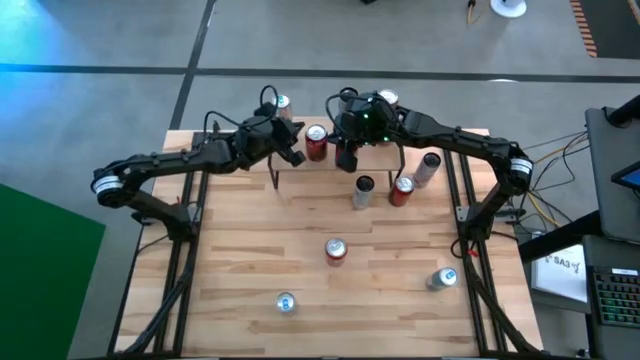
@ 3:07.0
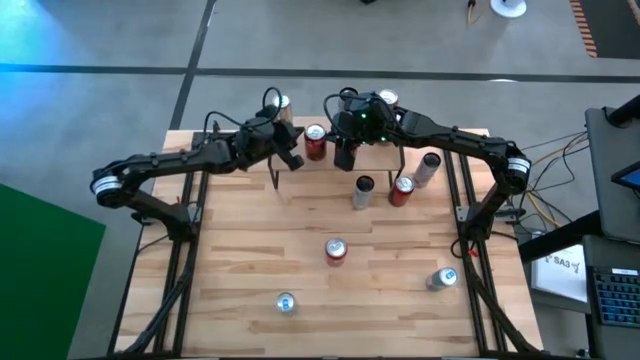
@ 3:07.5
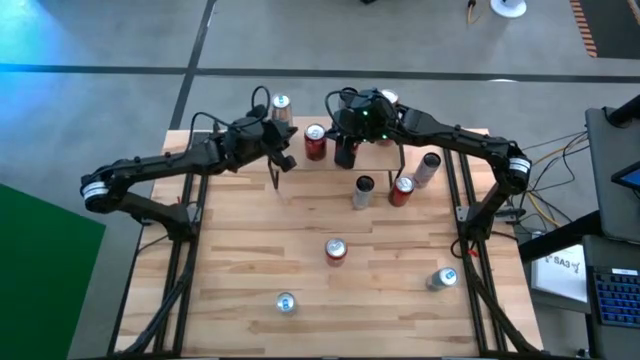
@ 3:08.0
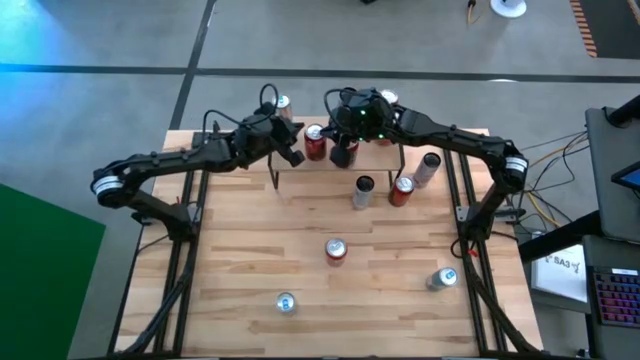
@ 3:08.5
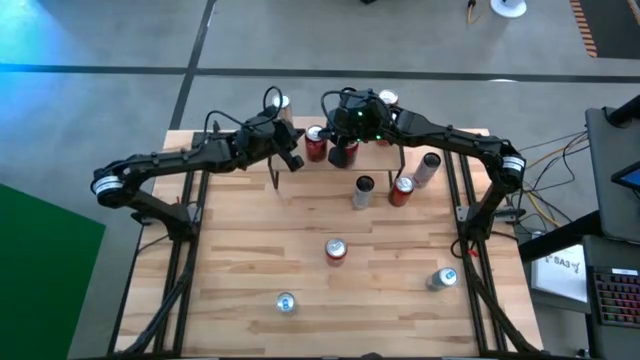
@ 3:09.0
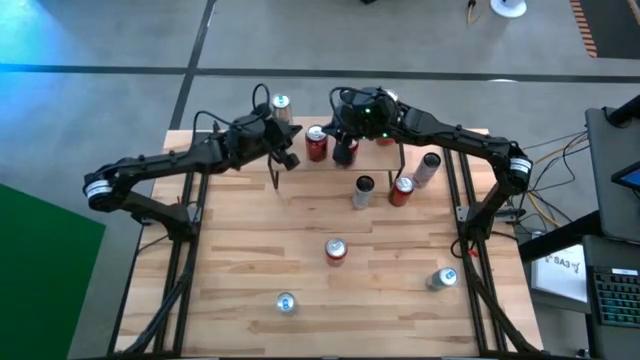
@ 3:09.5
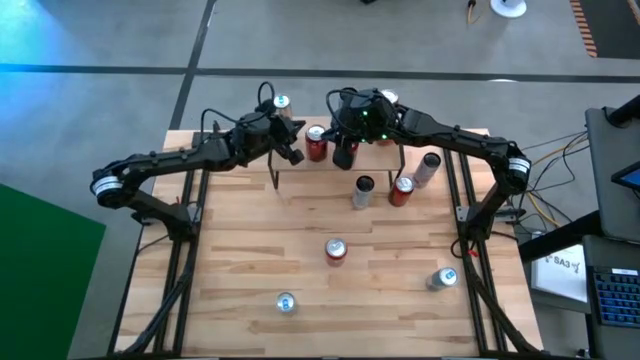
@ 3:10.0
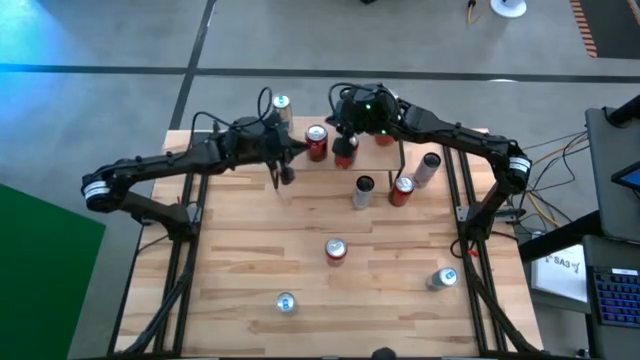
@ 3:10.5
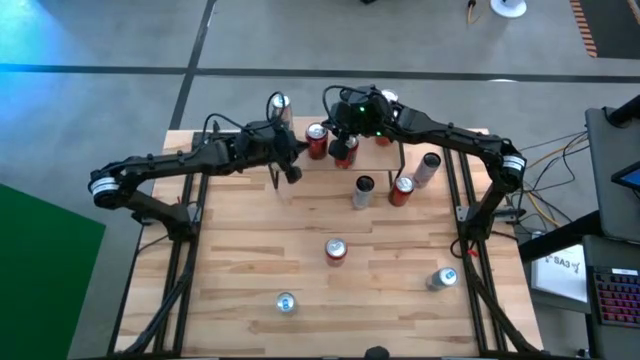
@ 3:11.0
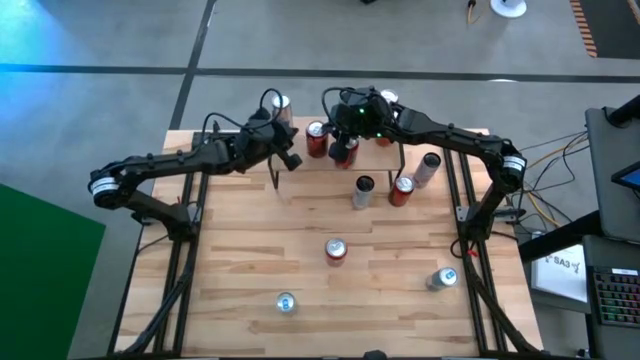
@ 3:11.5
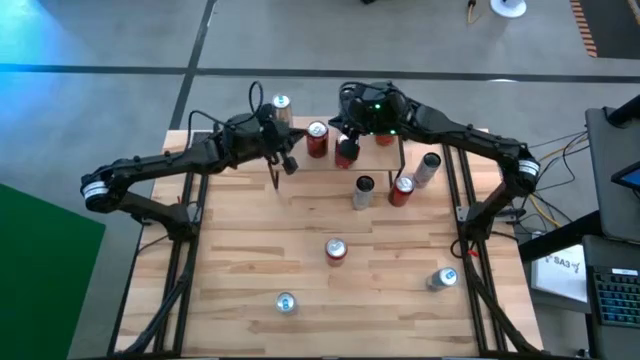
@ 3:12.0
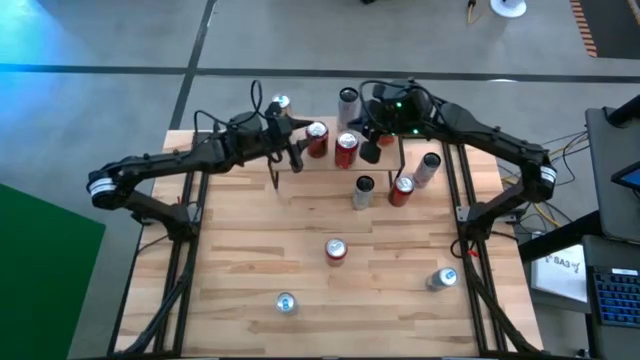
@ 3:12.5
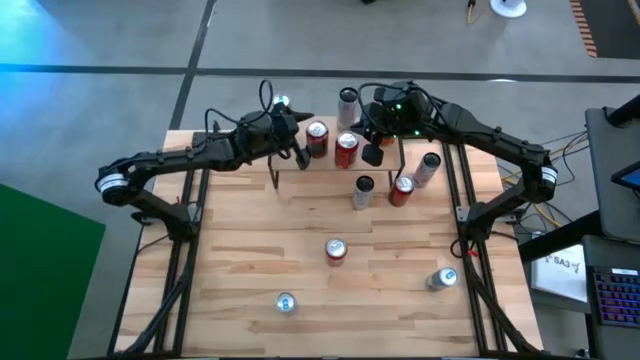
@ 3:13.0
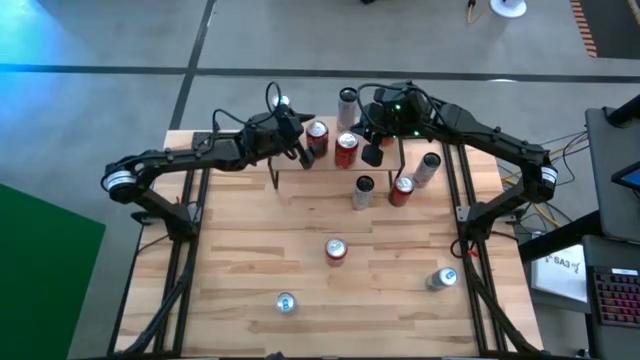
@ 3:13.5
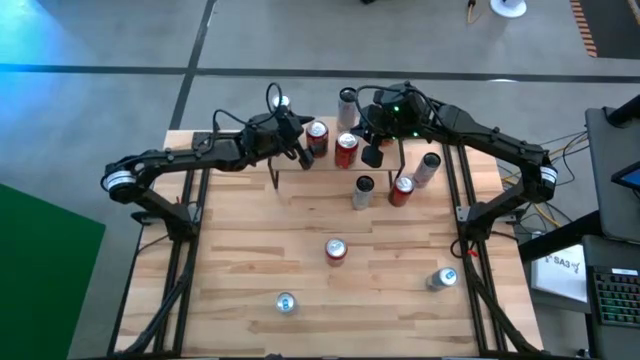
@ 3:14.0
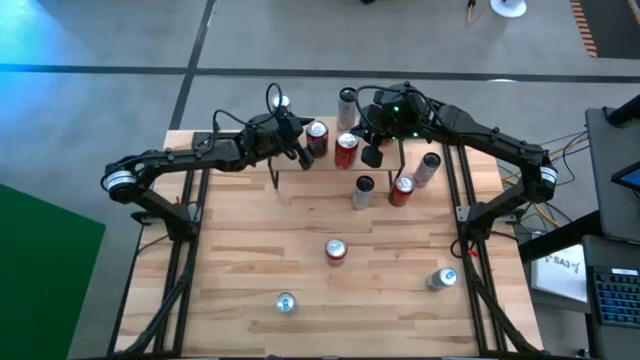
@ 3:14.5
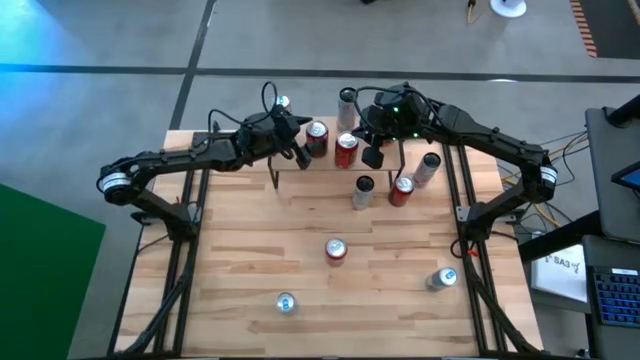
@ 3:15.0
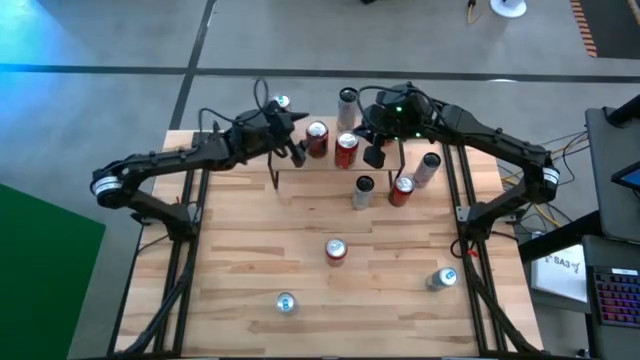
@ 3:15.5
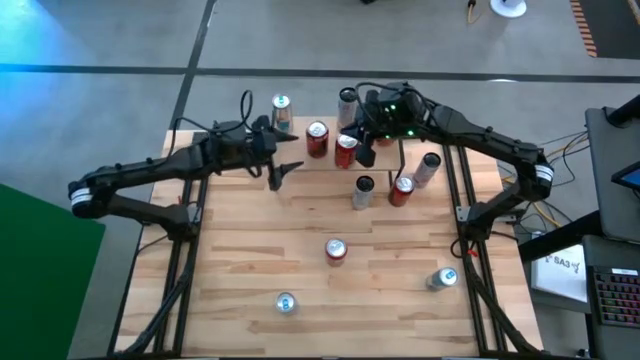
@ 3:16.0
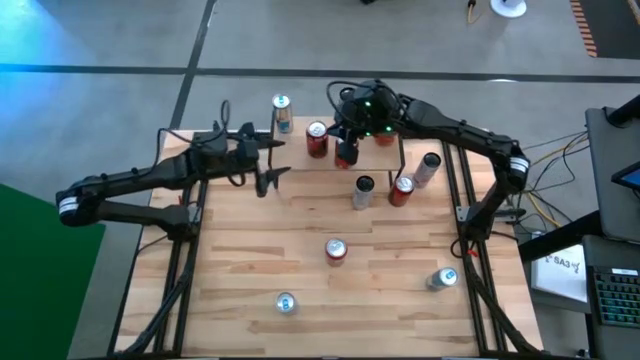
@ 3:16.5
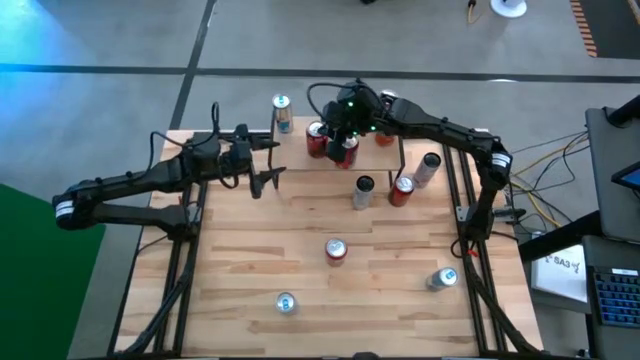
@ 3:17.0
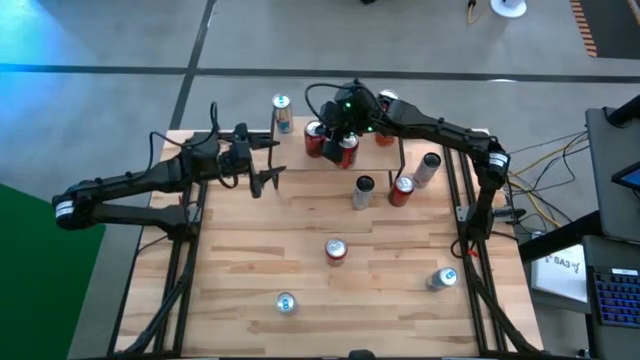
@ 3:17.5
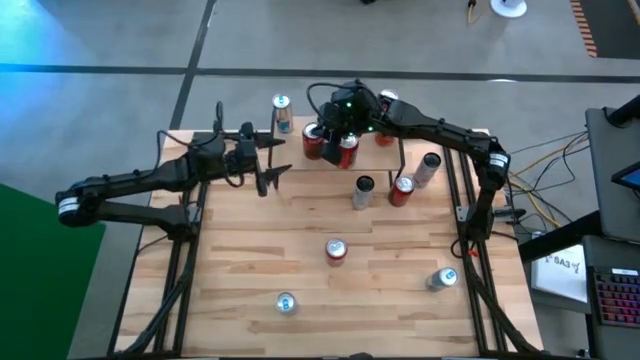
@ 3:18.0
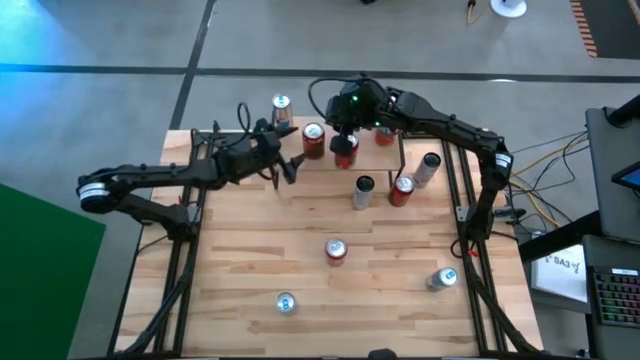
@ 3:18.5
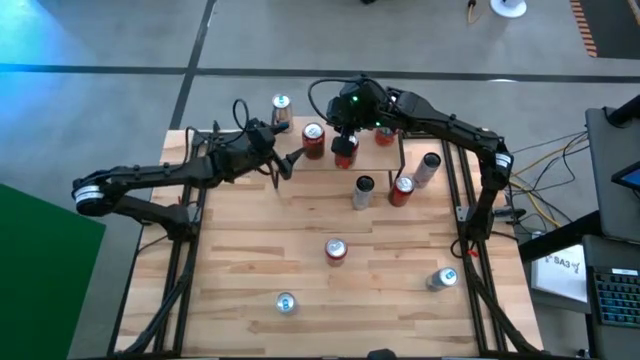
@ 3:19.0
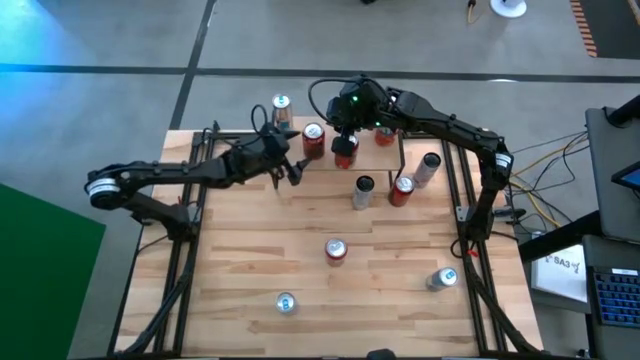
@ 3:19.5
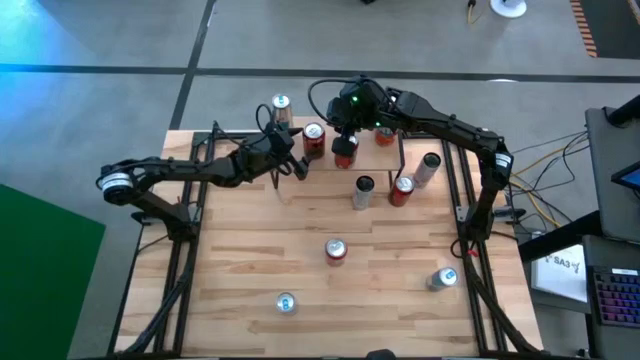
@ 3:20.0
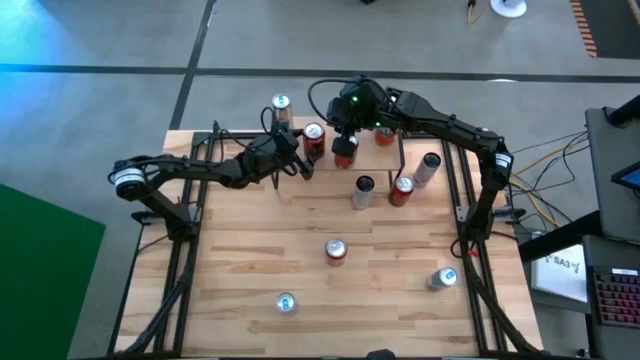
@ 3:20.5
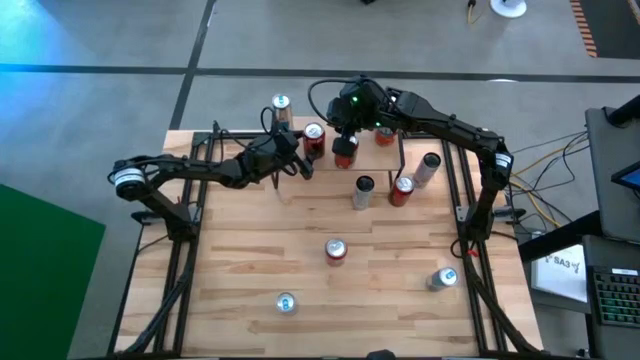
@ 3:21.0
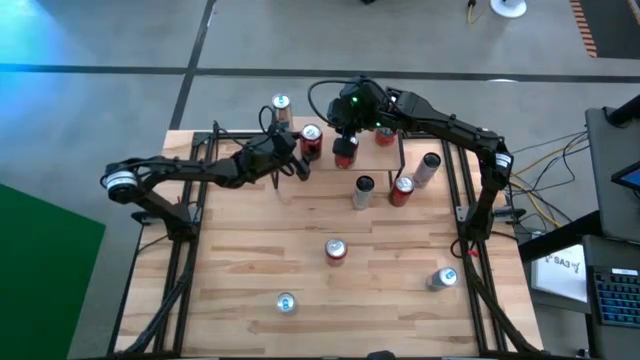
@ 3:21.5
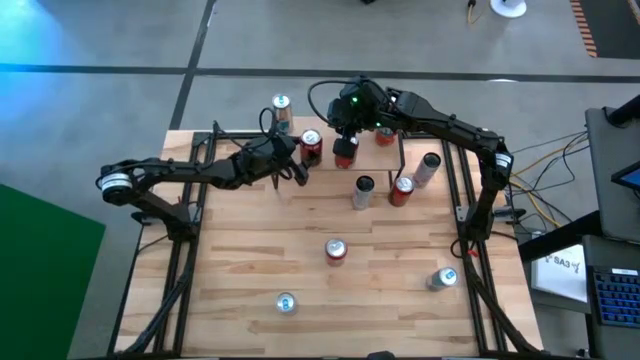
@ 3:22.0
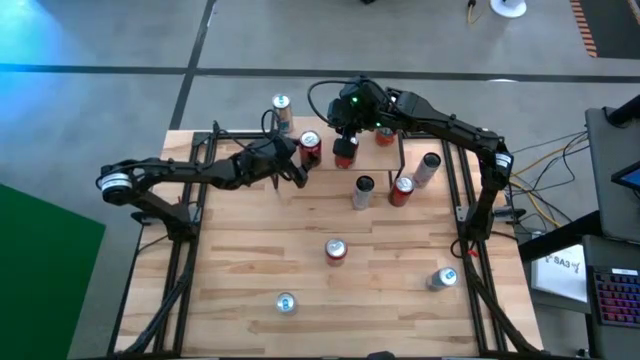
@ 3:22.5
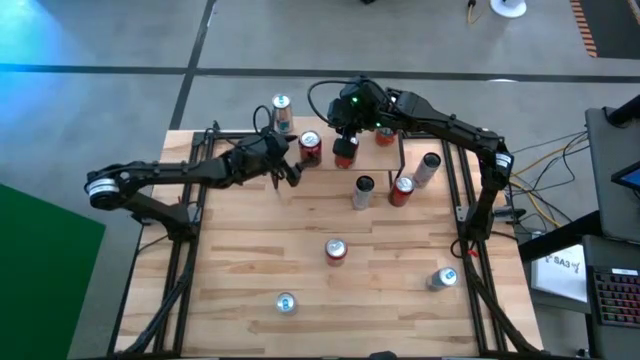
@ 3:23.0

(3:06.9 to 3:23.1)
Task: Place canned beverage on shelf
Adjust the red soda can on the shelf

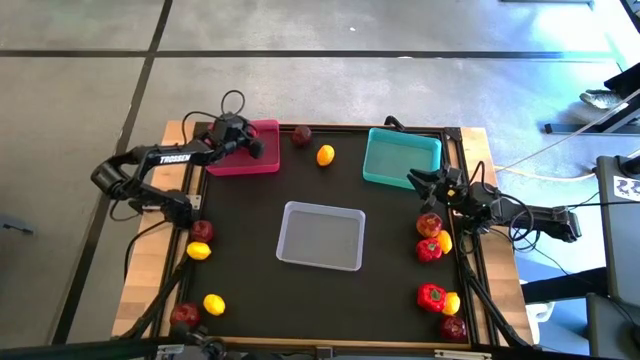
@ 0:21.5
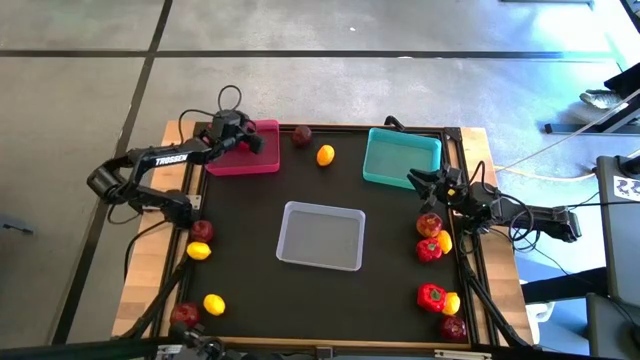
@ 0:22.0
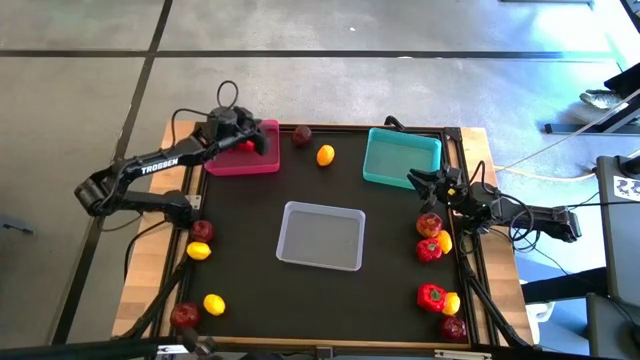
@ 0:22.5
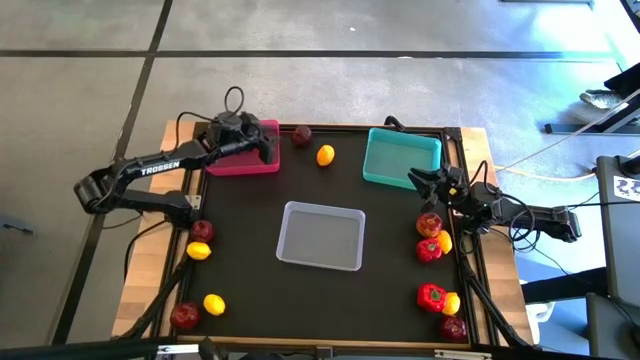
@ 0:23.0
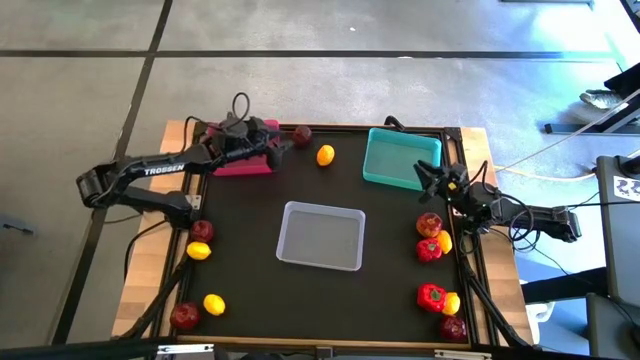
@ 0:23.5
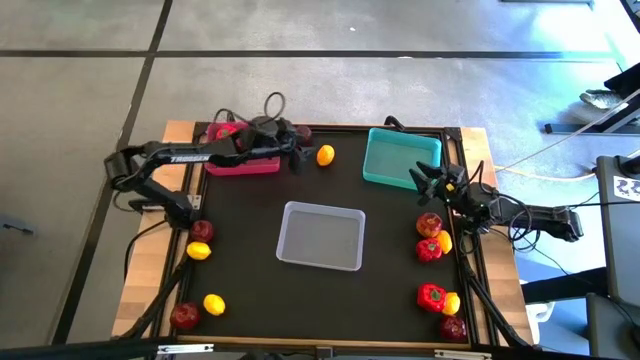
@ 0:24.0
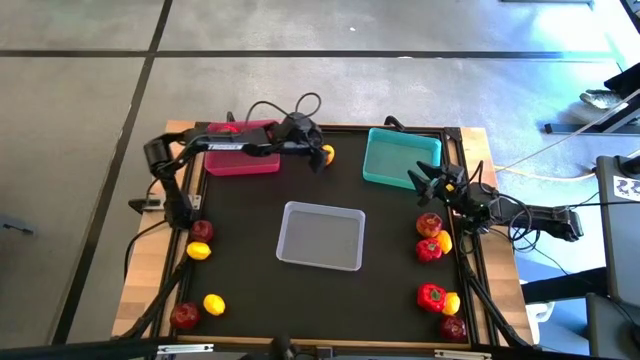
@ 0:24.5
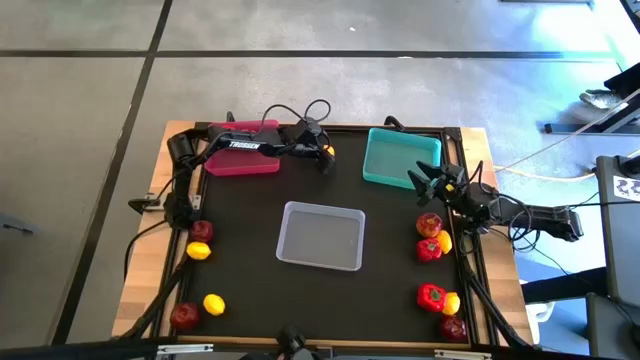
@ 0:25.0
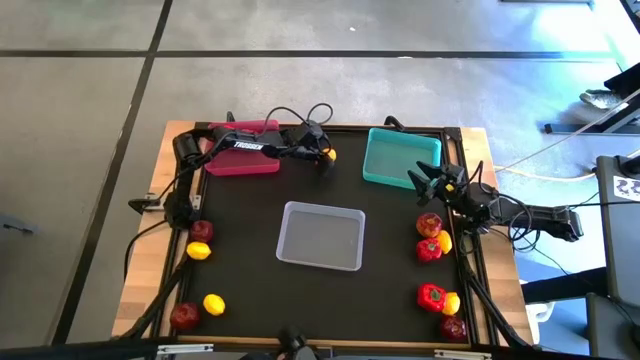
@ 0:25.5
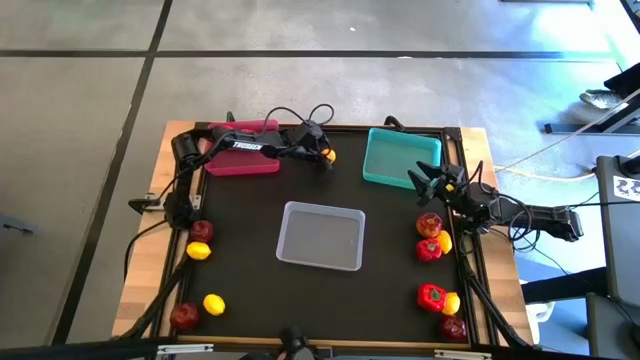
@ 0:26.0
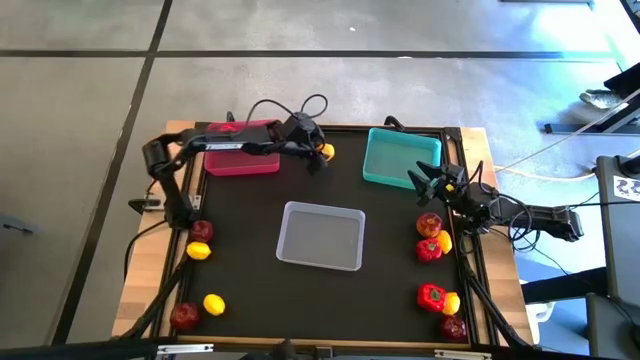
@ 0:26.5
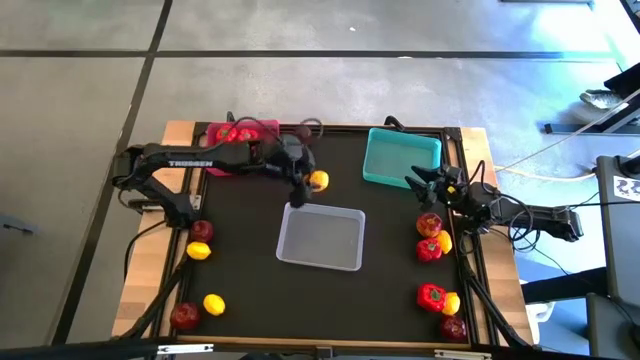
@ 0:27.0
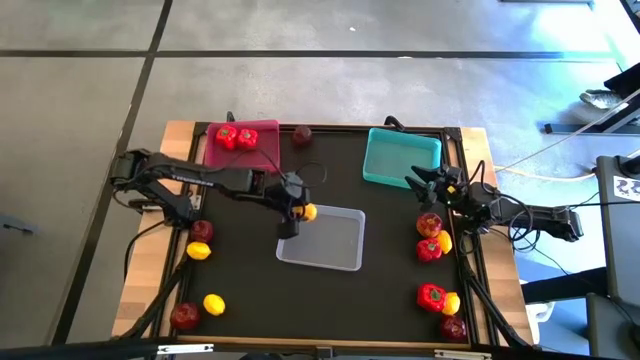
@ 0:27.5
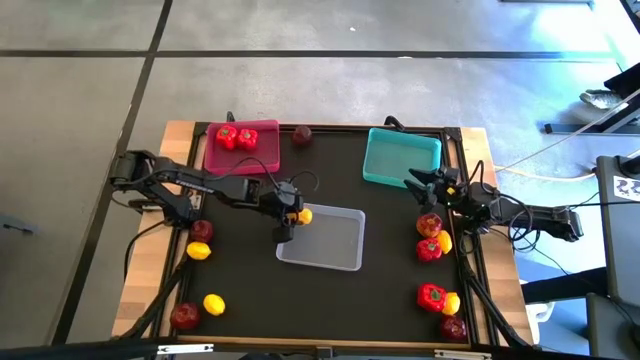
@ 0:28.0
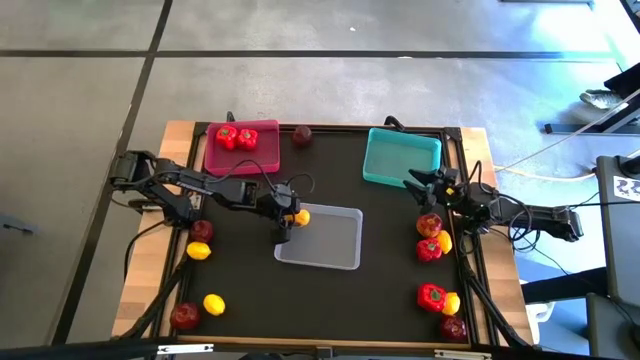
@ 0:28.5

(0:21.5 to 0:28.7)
Task: Sort produce into baskets
Put the lemon into the white bin
